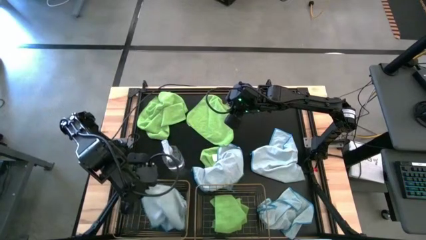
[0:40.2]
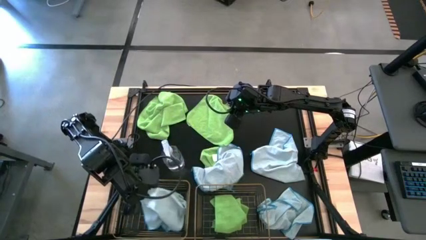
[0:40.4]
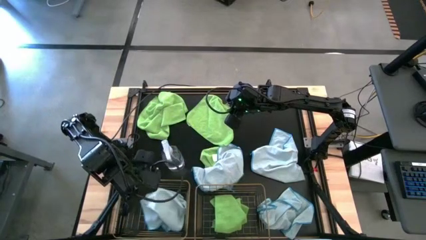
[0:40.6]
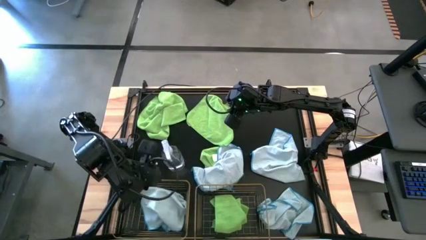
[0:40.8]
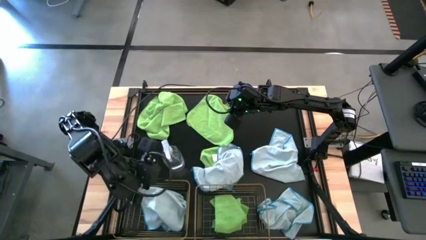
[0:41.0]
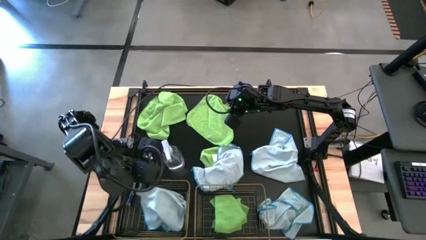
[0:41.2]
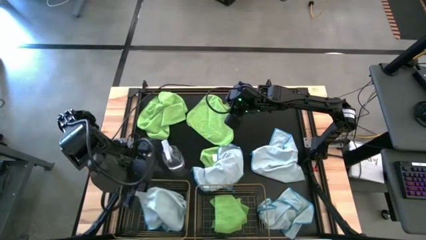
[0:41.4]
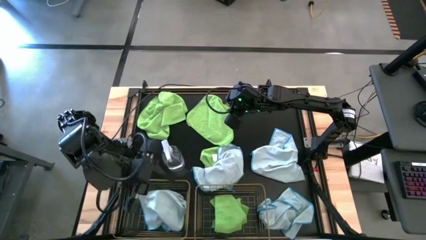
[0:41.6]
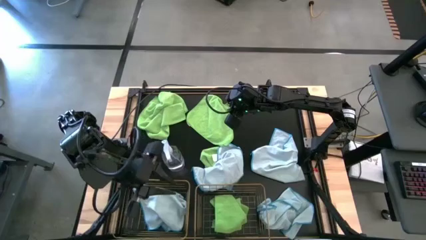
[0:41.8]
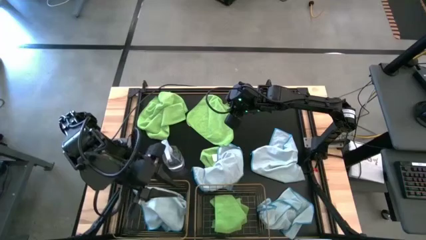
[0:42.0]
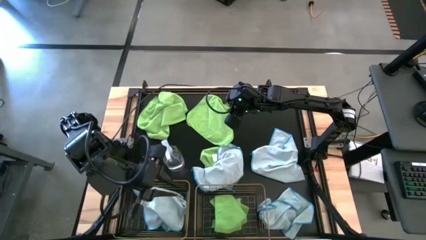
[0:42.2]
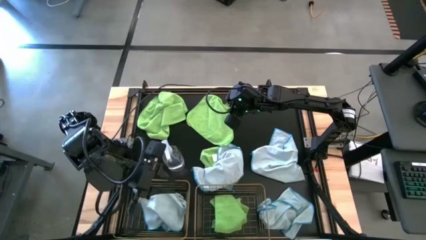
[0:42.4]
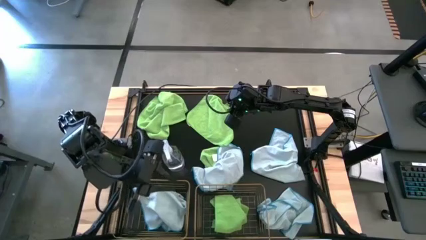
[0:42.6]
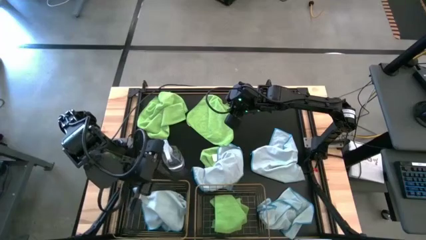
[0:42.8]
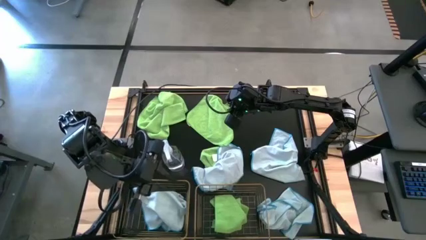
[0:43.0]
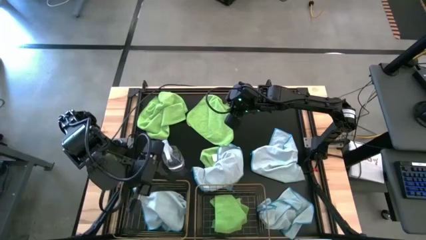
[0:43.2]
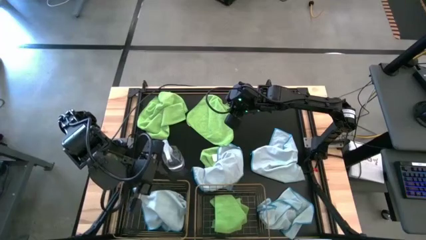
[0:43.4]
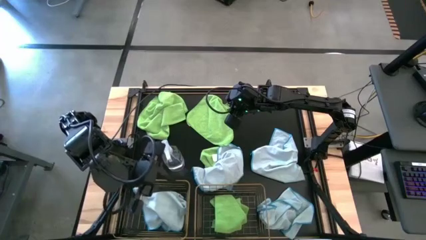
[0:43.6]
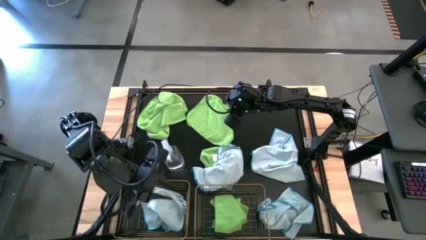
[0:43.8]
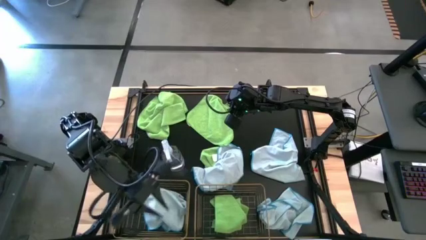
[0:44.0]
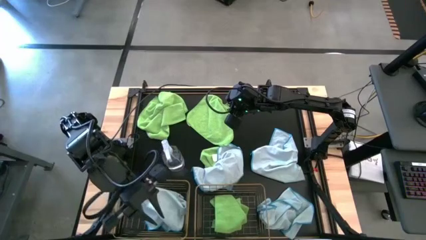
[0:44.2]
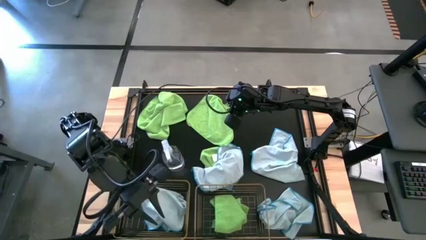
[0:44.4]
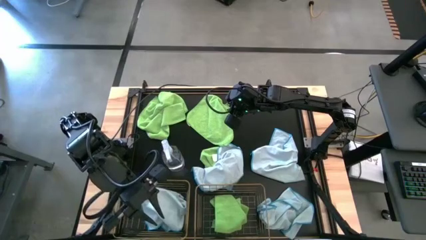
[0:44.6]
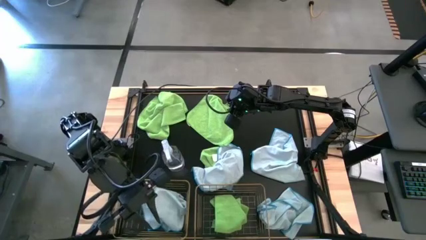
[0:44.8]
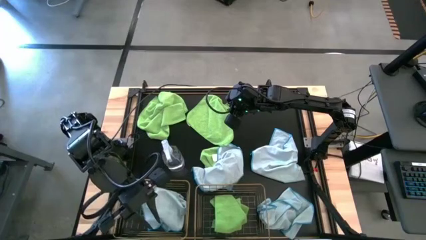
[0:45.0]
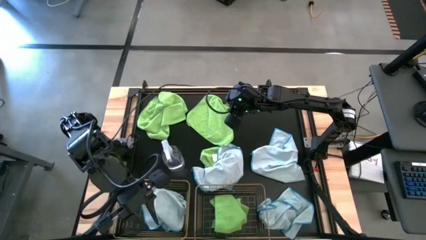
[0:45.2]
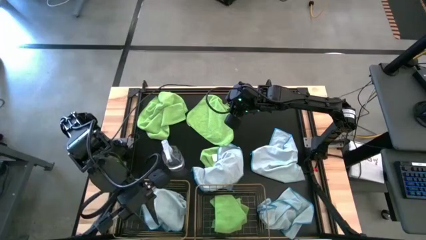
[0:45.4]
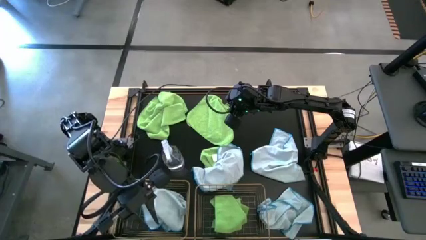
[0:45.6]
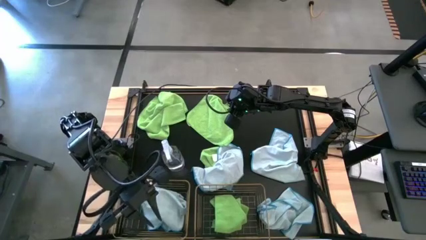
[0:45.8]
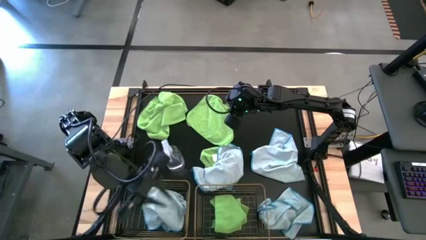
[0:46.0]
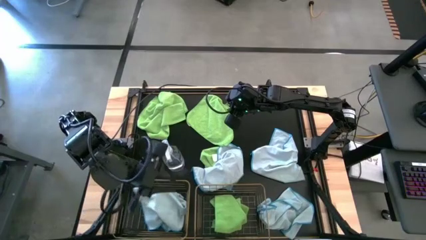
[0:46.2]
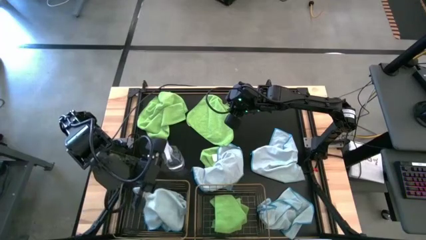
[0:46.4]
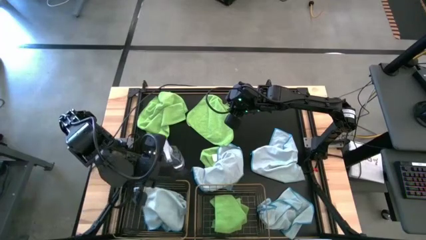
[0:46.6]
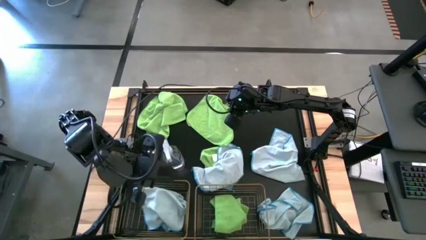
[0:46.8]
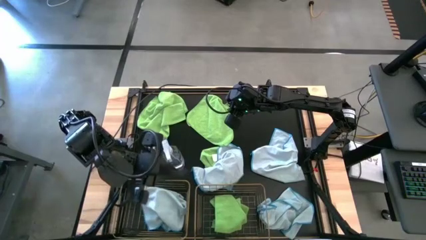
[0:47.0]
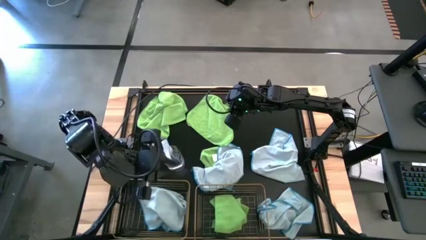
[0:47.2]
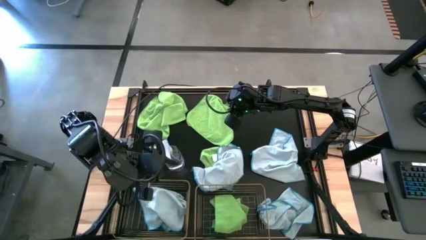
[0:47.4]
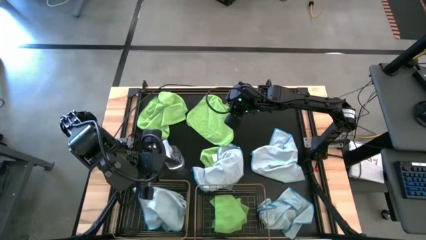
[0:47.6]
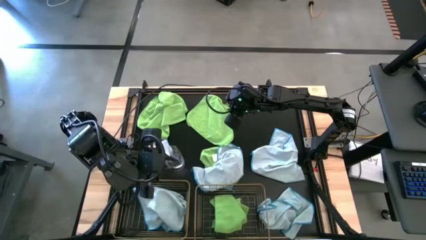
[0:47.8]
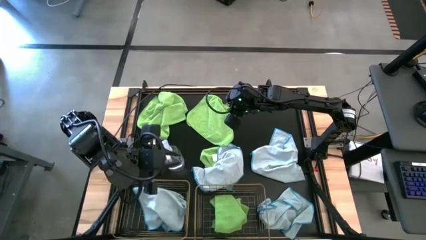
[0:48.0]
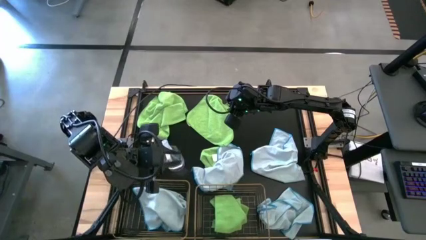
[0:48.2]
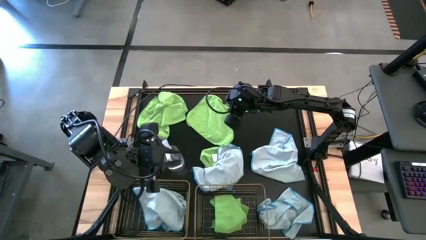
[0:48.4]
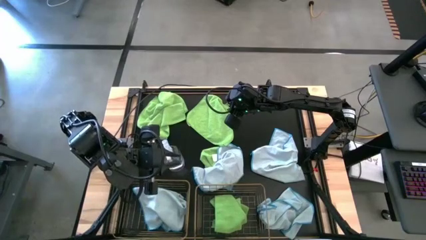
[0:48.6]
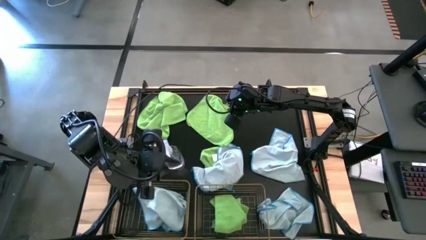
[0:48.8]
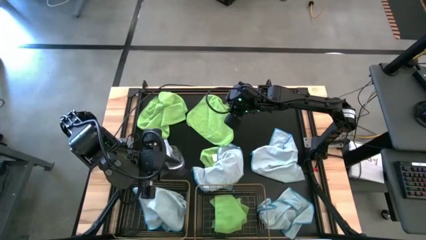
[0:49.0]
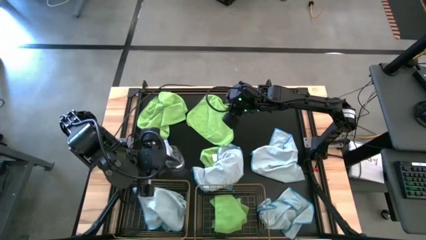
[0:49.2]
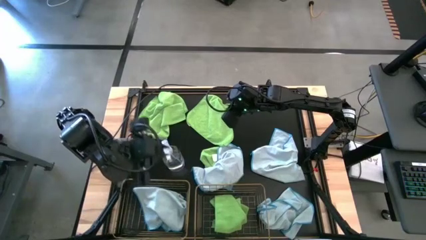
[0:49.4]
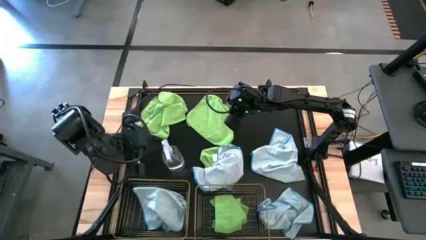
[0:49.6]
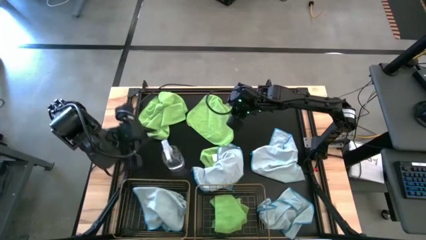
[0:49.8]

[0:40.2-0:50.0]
Task: Sort microfiber towel by color & place in baskets
Put the green microfiber cloth into the right wire basket
